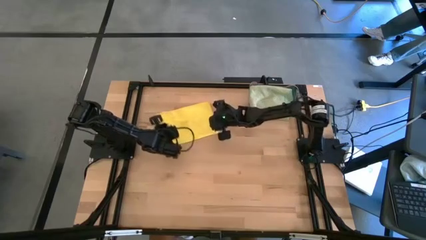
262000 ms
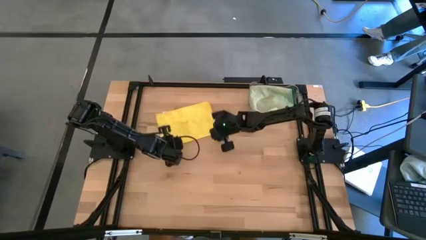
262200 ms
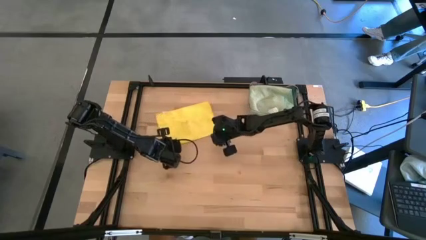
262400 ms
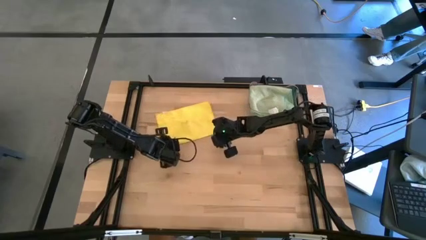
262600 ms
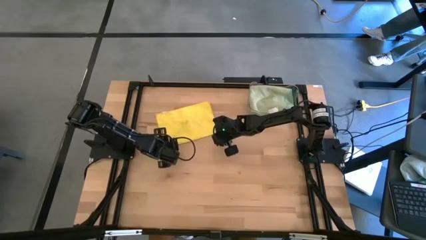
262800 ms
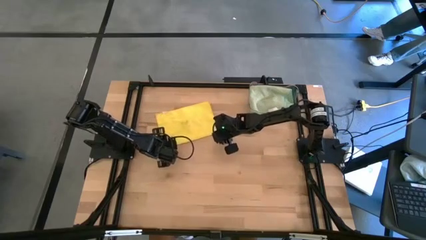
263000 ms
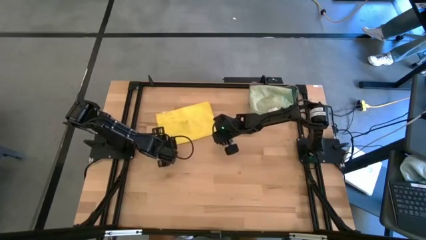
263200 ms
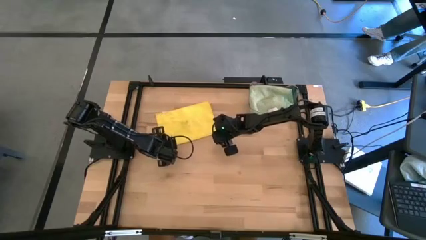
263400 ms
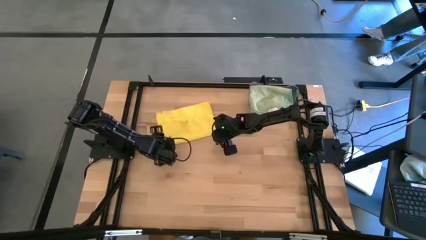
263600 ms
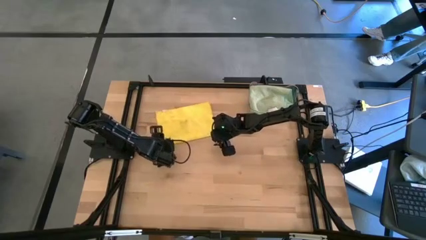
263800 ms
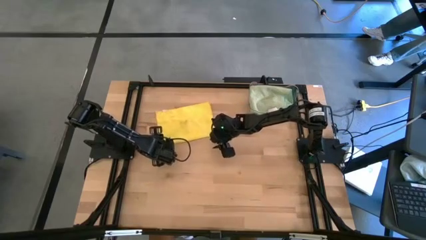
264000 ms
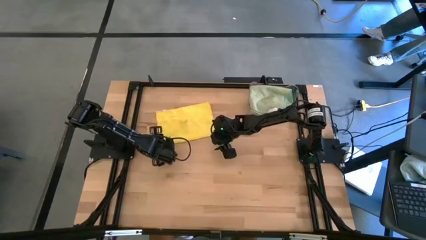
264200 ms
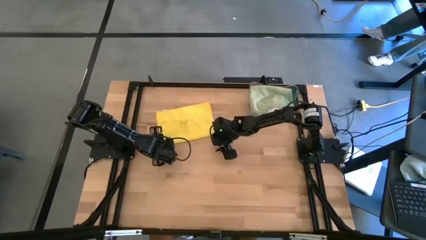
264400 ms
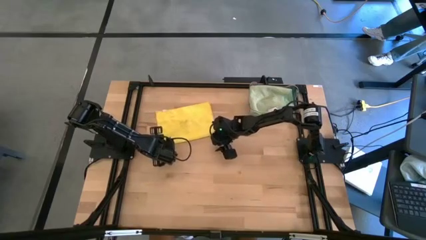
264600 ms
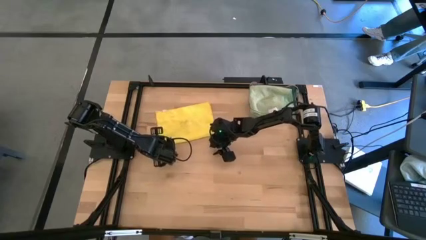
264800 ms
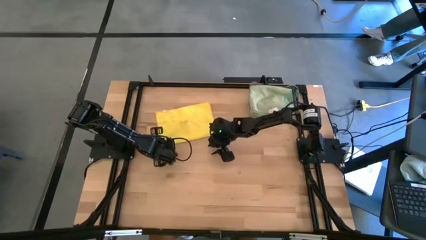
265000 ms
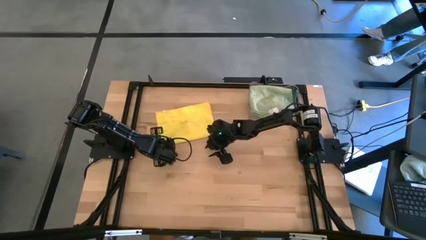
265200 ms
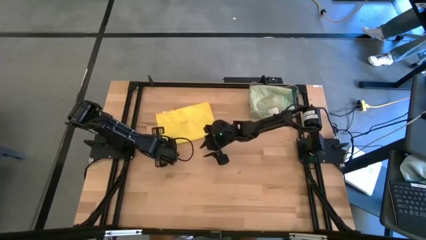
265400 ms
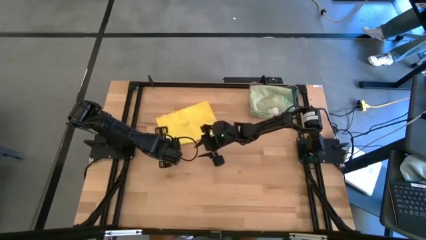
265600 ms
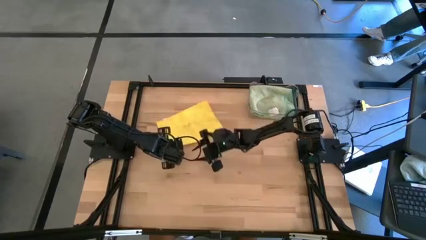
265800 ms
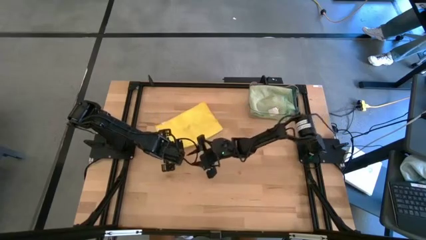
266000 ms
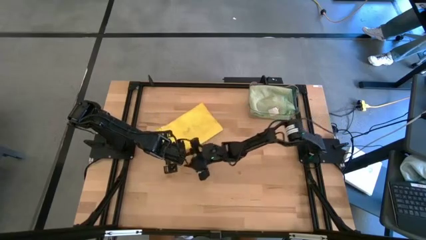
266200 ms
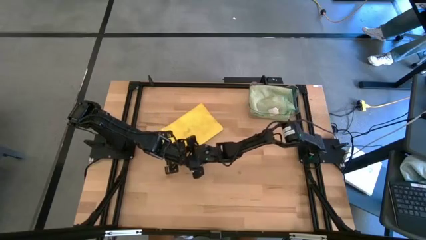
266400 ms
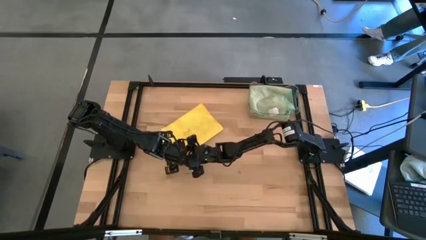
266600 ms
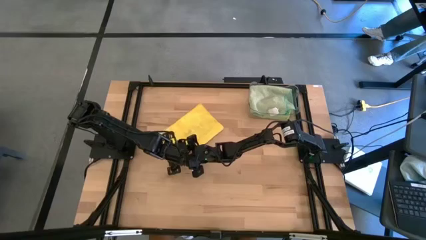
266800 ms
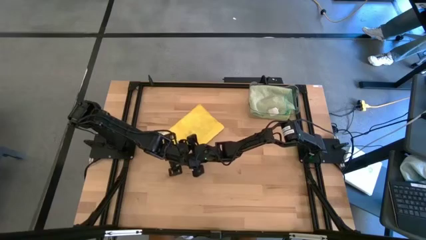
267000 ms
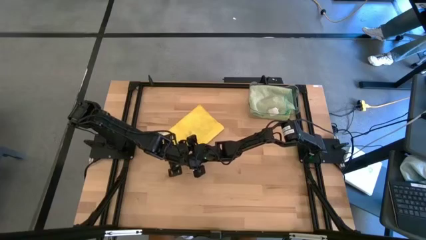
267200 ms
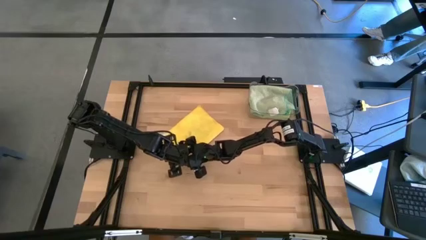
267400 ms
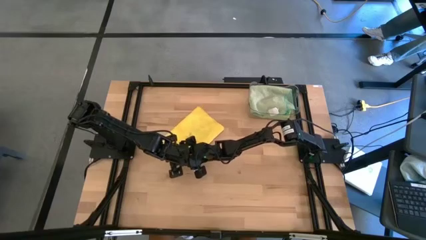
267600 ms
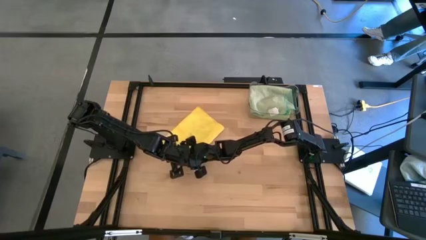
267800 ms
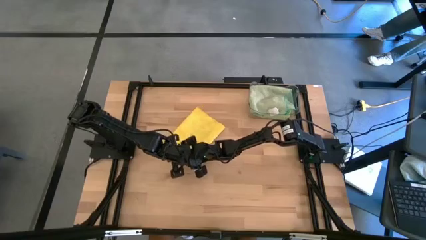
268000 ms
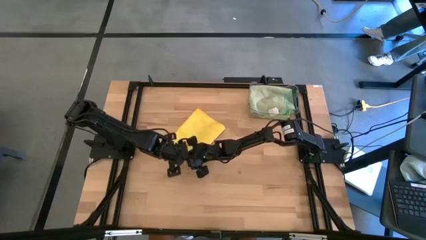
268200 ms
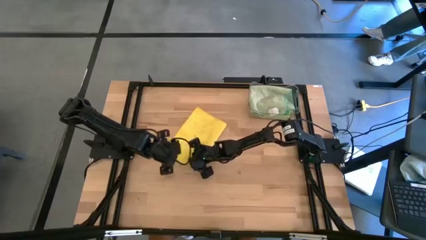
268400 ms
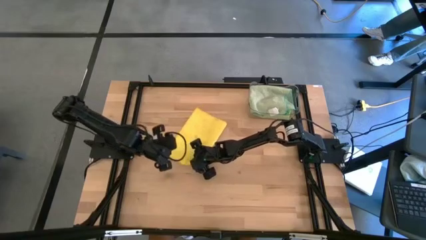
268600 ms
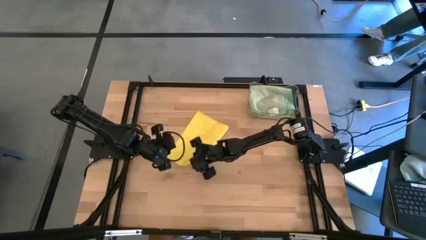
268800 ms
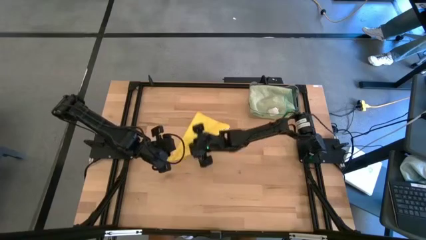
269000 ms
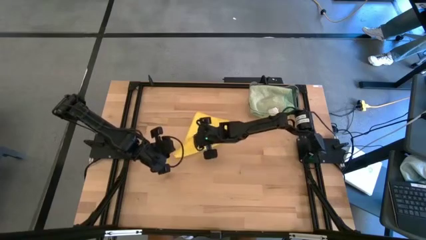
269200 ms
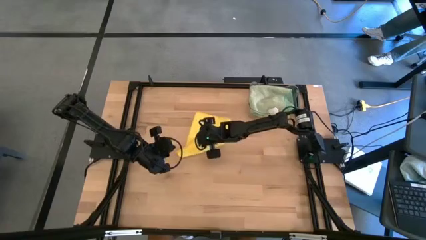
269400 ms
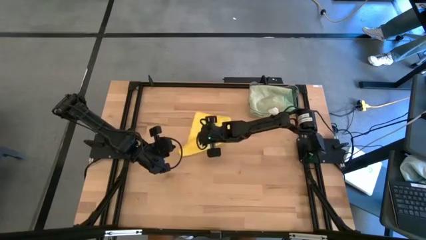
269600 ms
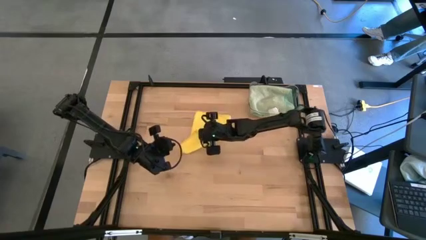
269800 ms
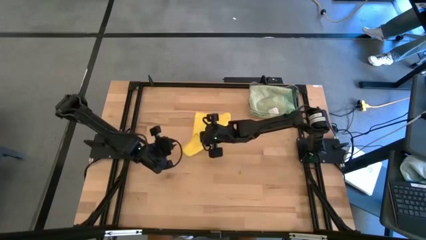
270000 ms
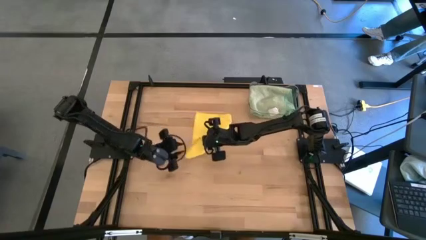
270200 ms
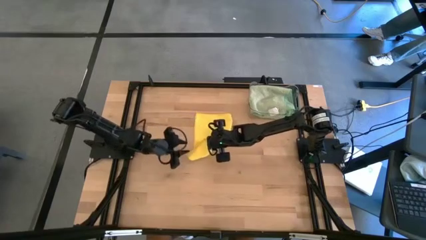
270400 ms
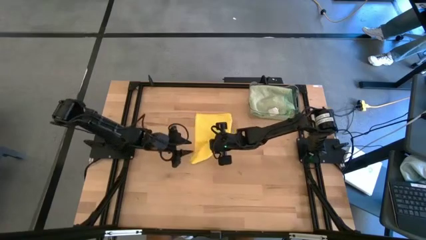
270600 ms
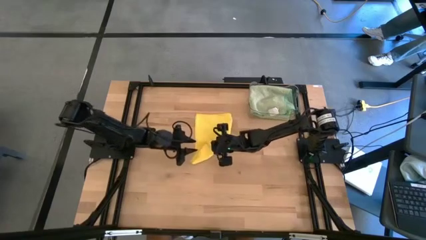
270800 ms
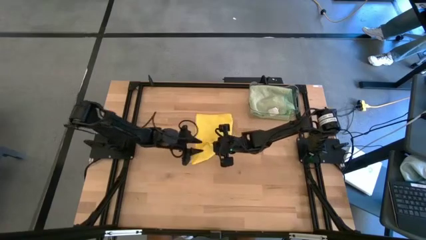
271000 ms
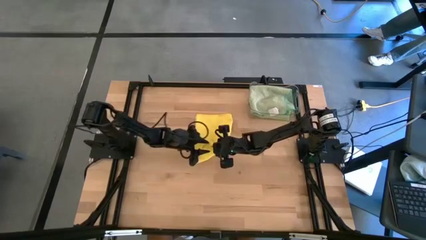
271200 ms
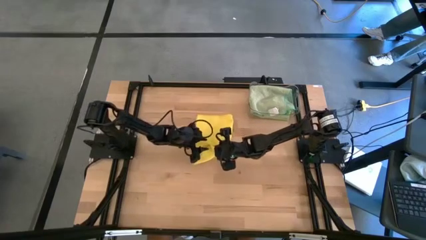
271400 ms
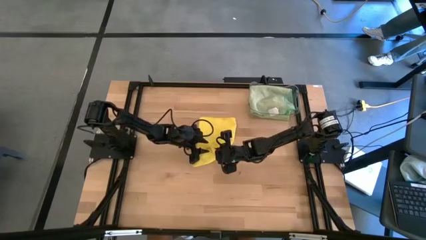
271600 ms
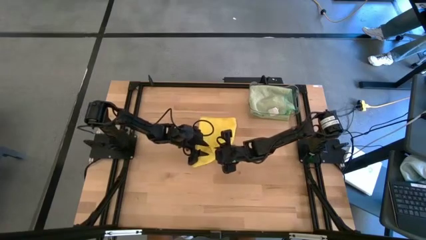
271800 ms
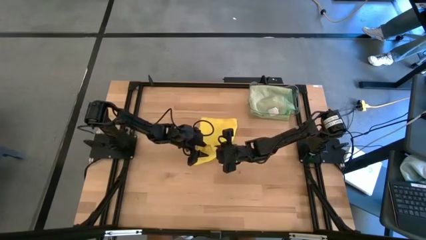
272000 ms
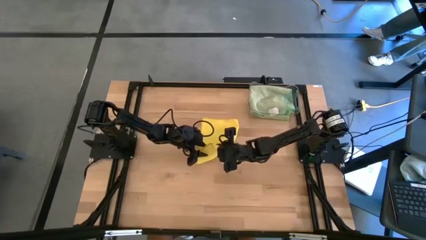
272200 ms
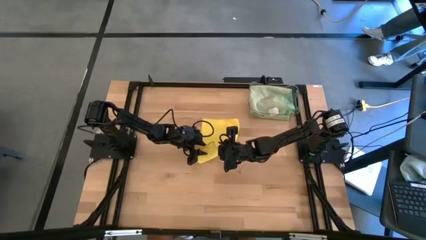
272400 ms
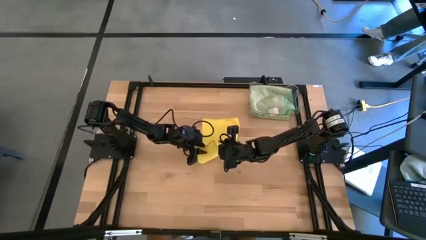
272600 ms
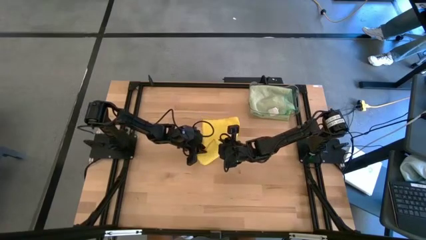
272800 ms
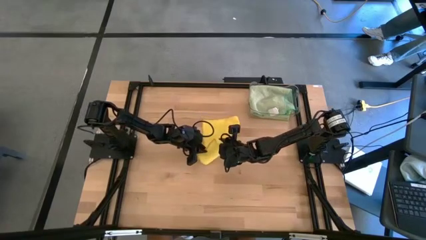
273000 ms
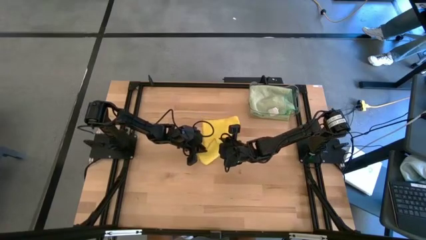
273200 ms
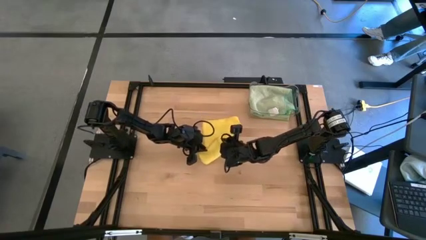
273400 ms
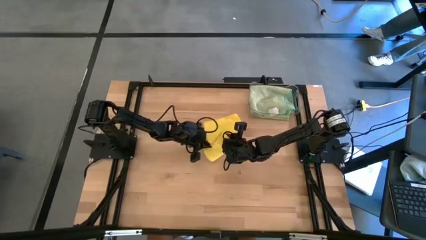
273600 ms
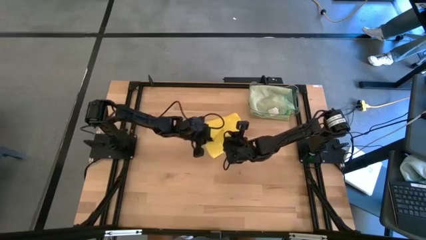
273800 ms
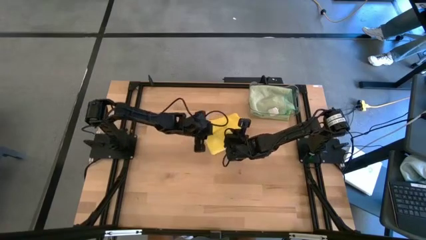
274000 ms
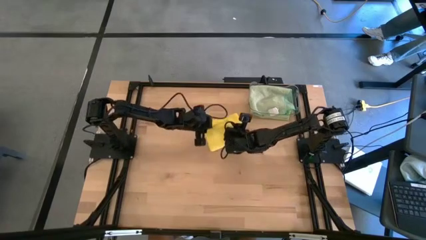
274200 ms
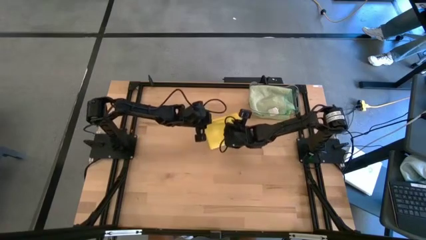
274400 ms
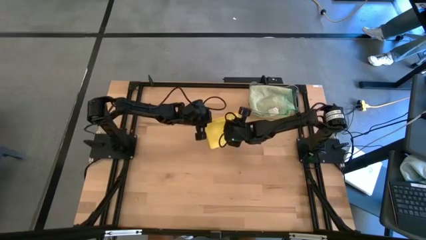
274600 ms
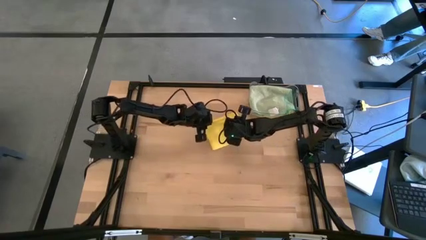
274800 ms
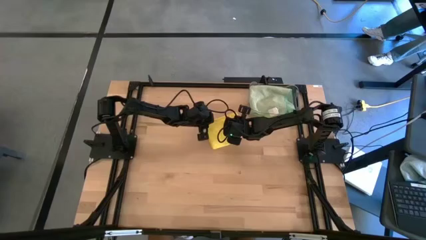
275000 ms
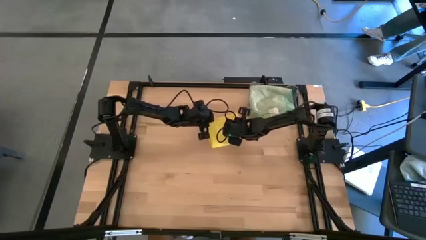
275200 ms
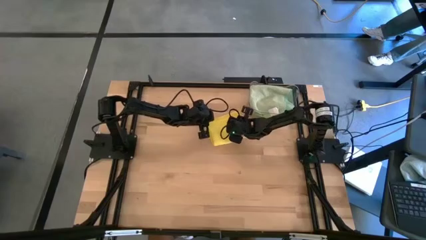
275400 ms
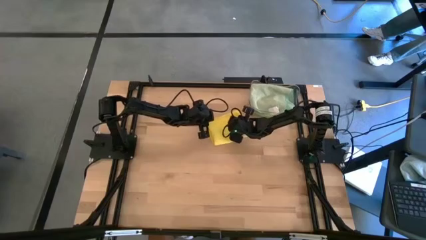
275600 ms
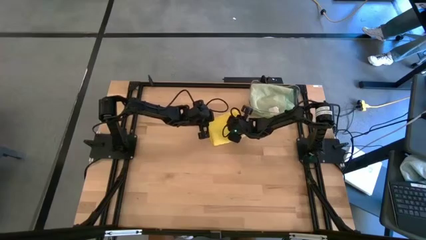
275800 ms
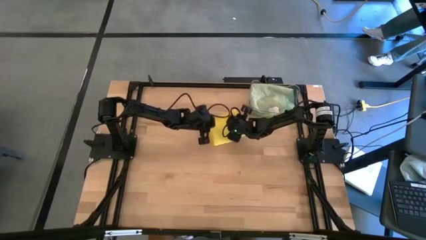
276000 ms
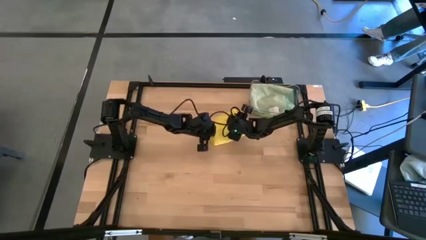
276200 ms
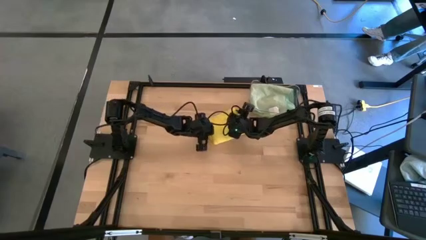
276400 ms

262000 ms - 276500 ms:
Task: Fold microfiber towels
Fold the yellow cloth

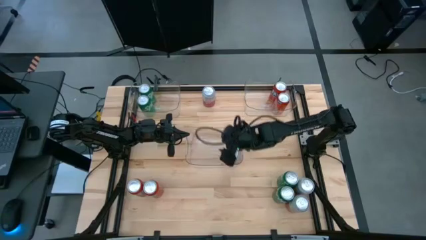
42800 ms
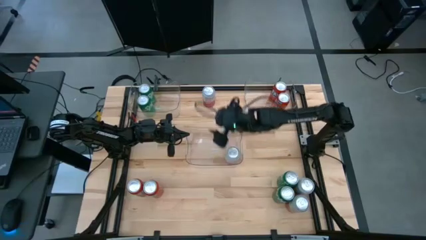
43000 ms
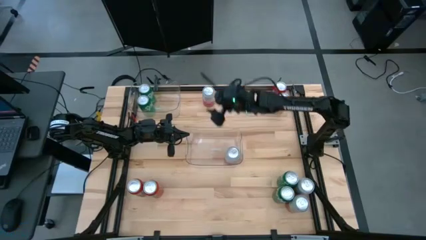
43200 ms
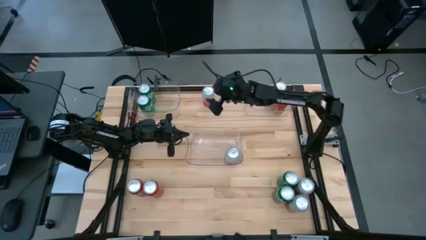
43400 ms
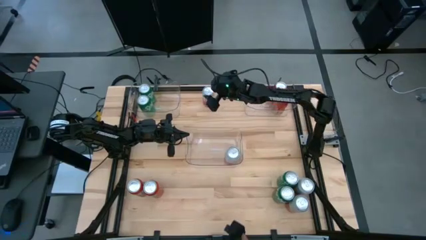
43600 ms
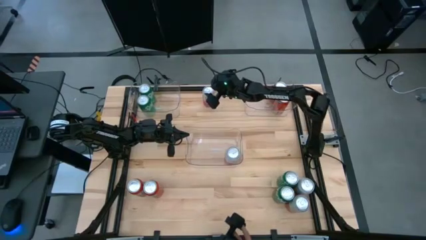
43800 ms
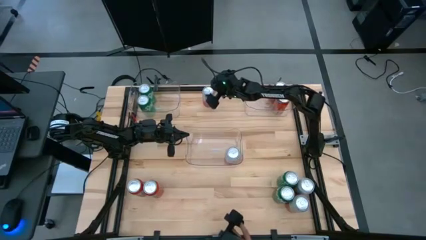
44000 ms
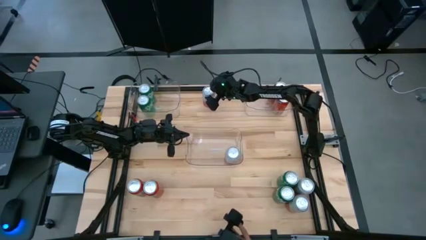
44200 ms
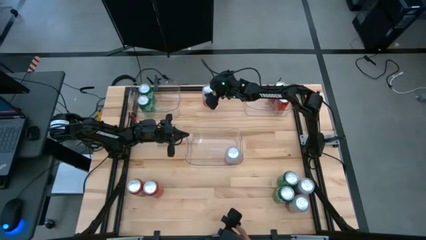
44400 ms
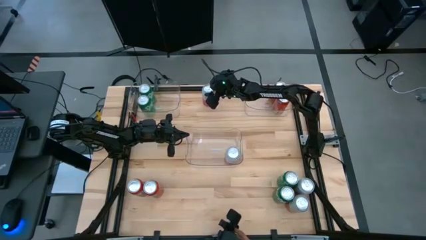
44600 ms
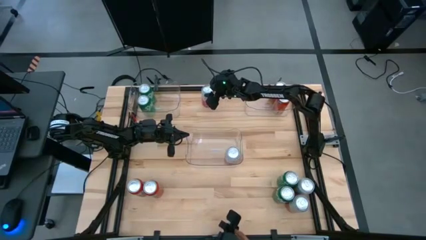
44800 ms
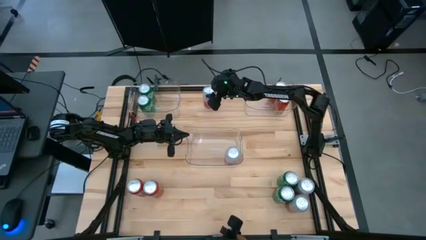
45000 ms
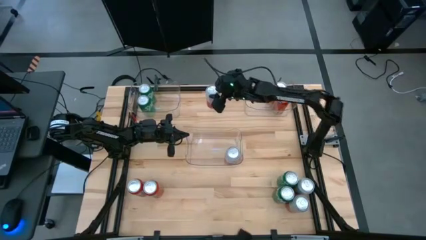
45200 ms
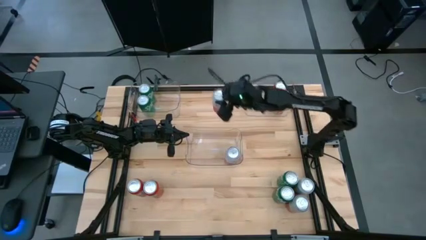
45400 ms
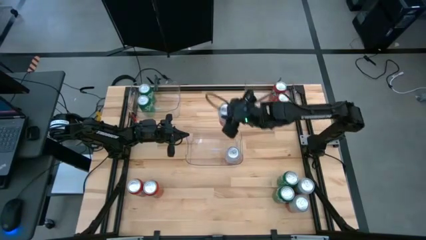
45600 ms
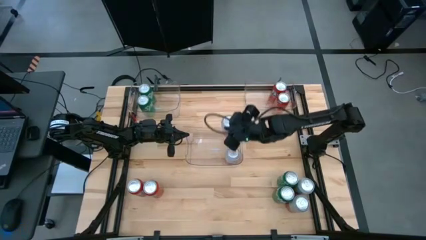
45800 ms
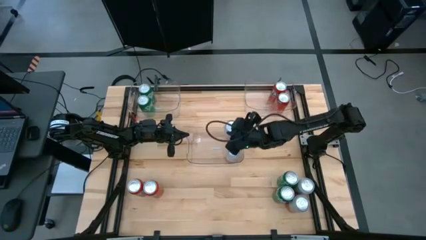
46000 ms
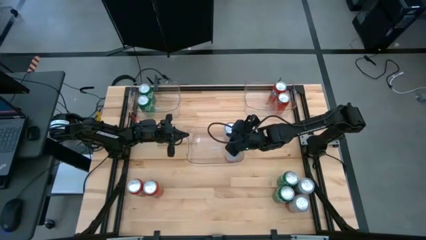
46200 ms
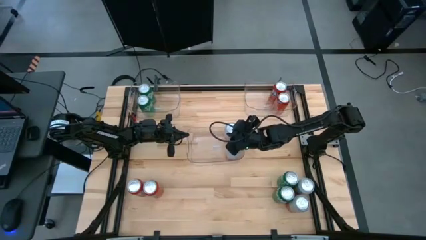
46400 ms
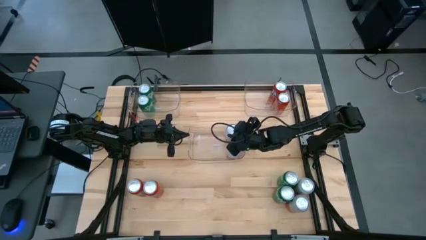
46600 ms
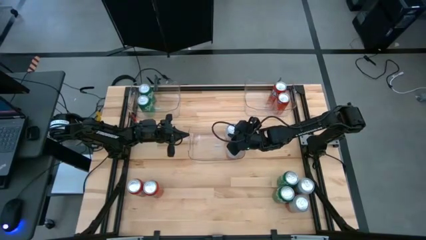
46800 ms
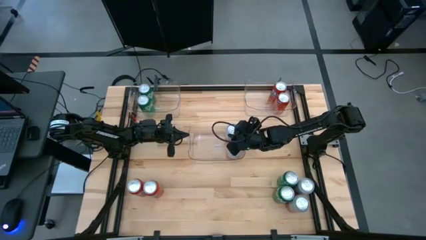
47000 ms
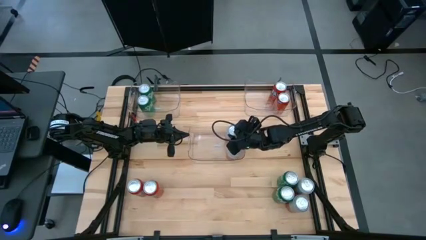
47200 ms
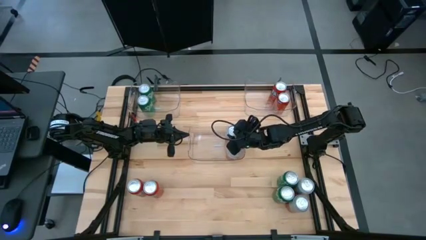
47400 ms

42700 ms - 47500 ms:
Task: Sort soda cans
Put the pink-white soda can into the bottom transparent bin
